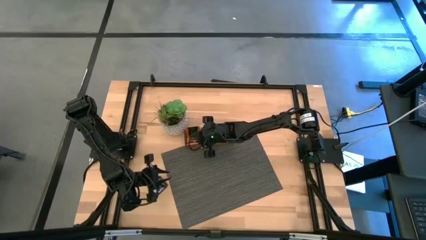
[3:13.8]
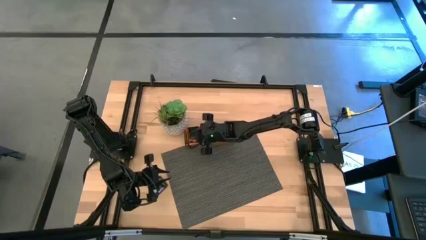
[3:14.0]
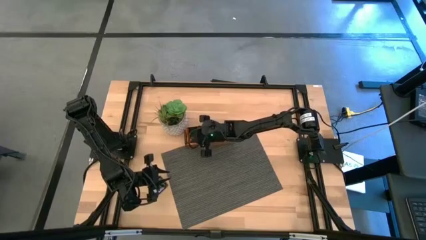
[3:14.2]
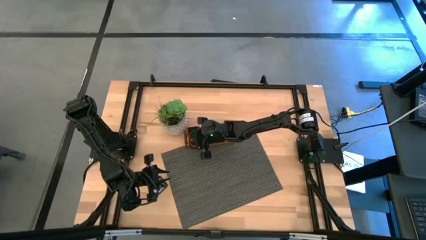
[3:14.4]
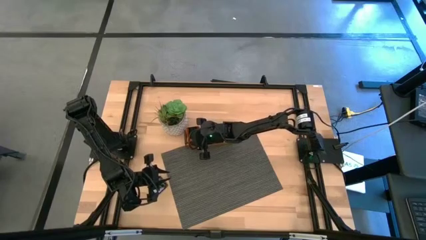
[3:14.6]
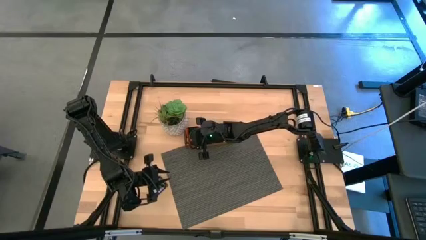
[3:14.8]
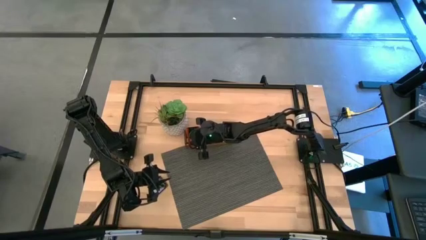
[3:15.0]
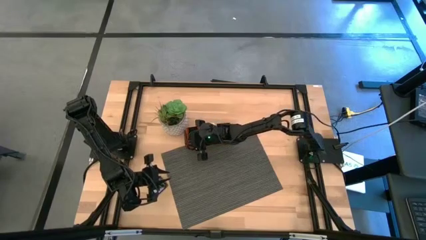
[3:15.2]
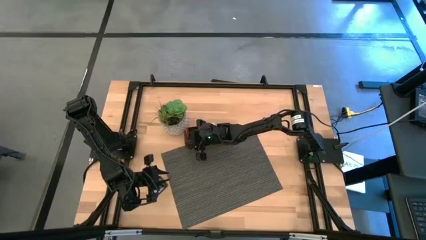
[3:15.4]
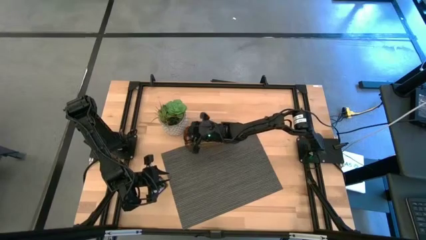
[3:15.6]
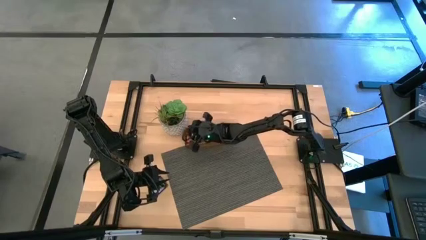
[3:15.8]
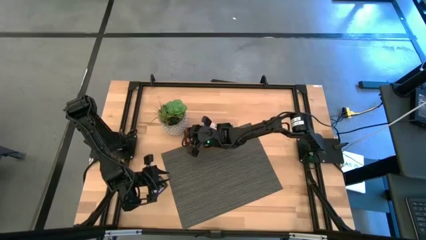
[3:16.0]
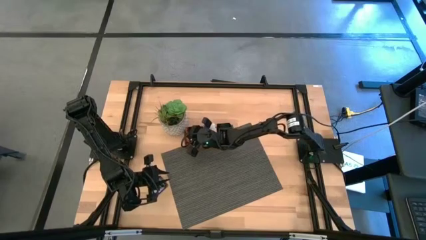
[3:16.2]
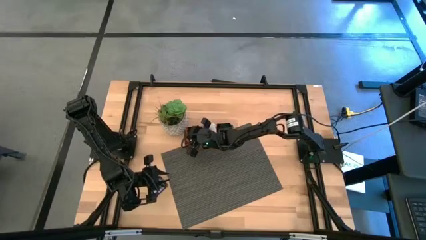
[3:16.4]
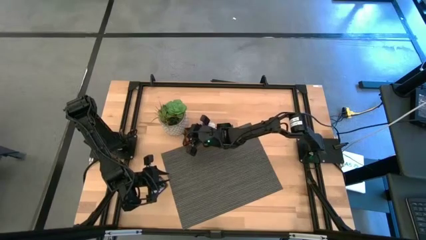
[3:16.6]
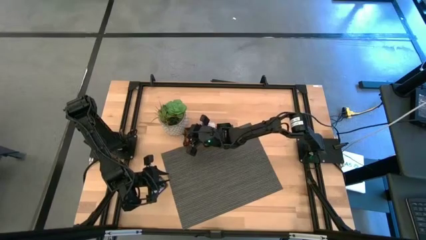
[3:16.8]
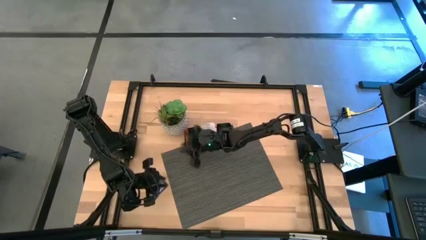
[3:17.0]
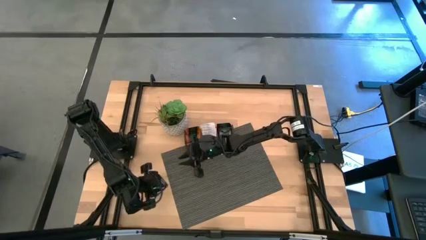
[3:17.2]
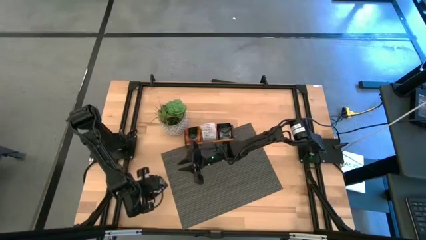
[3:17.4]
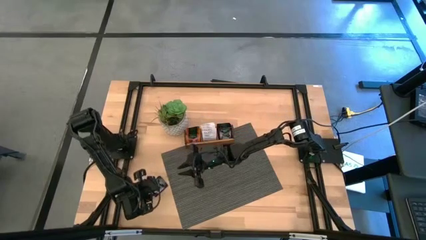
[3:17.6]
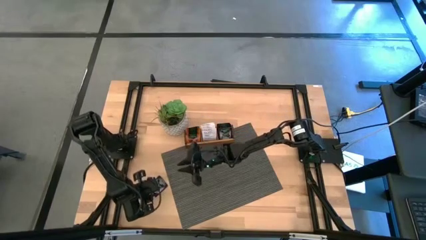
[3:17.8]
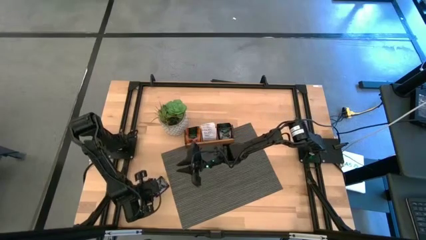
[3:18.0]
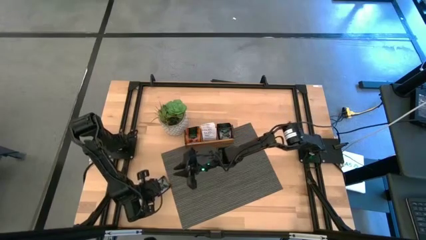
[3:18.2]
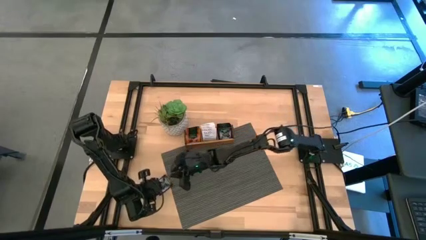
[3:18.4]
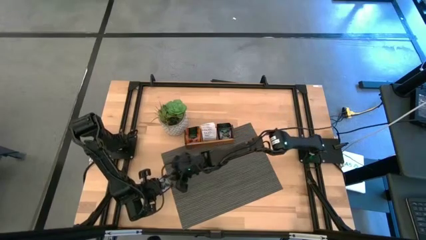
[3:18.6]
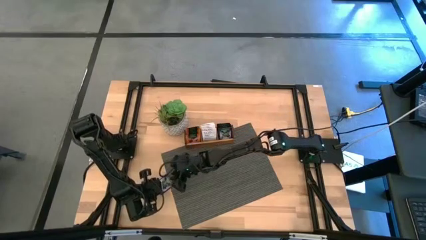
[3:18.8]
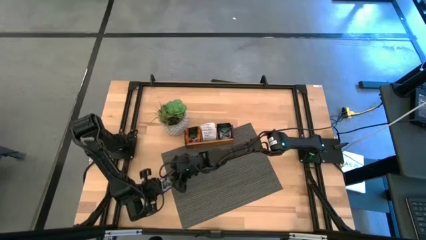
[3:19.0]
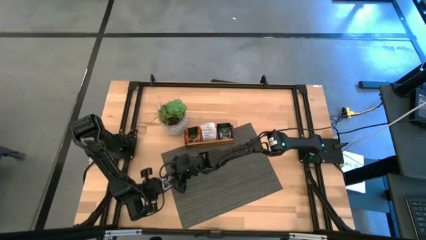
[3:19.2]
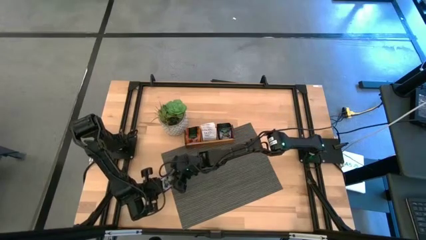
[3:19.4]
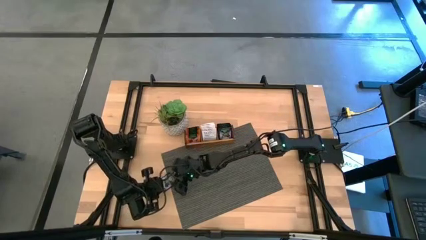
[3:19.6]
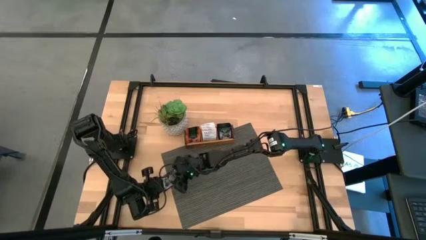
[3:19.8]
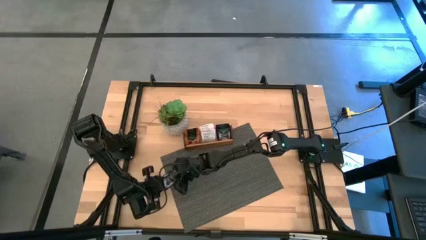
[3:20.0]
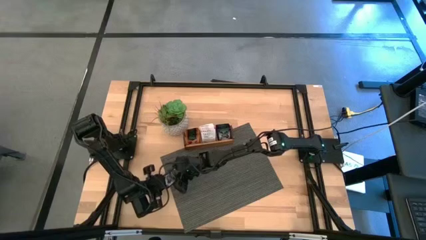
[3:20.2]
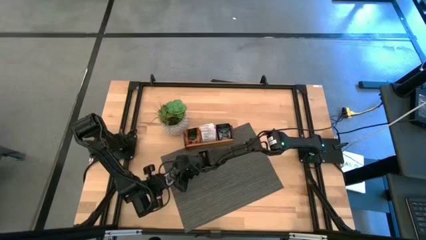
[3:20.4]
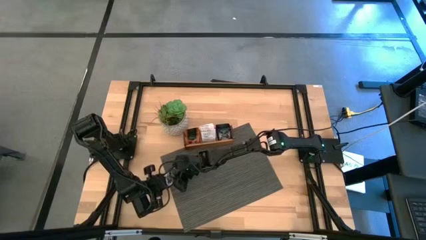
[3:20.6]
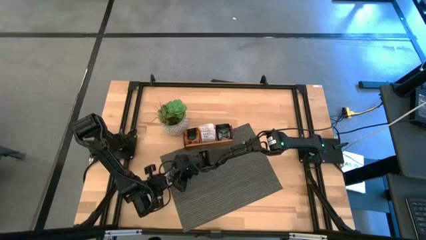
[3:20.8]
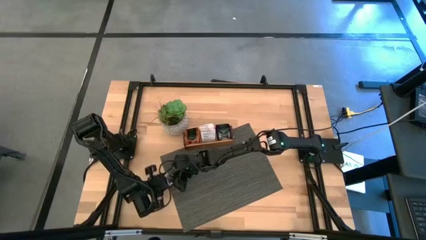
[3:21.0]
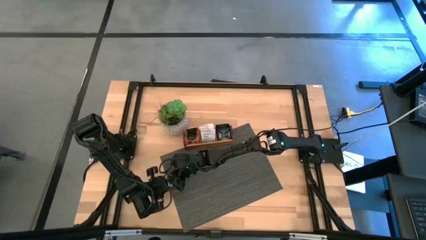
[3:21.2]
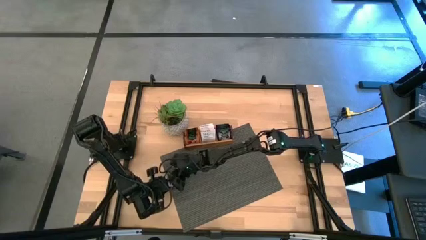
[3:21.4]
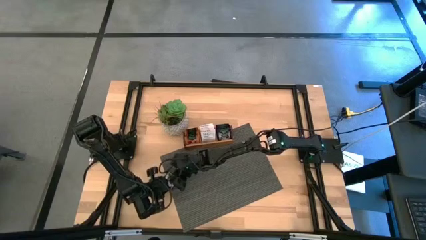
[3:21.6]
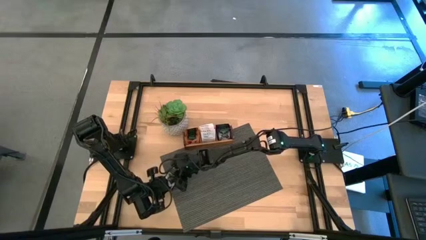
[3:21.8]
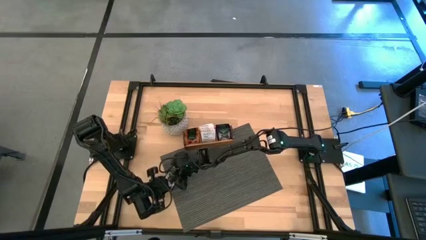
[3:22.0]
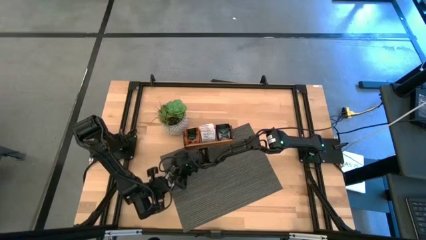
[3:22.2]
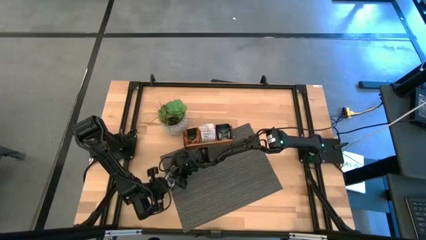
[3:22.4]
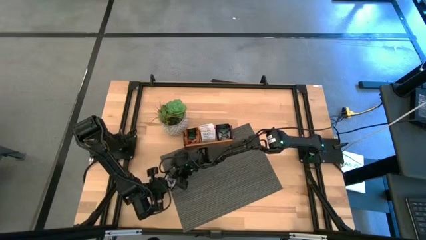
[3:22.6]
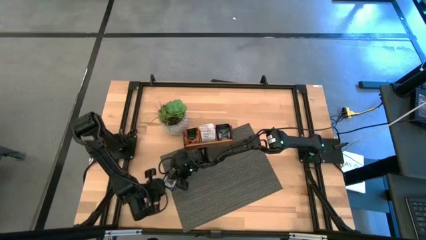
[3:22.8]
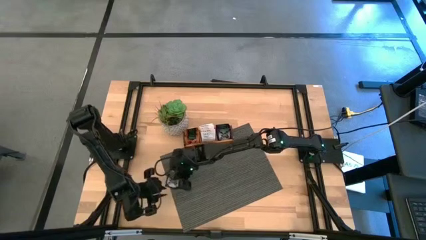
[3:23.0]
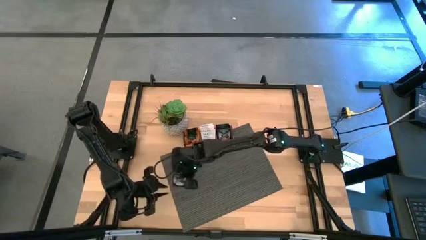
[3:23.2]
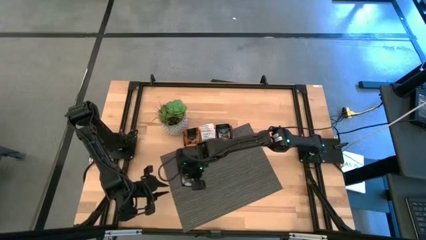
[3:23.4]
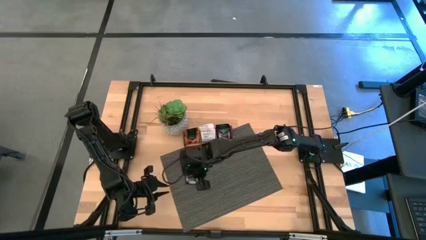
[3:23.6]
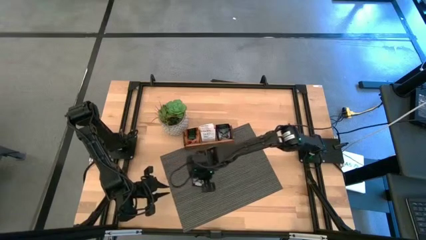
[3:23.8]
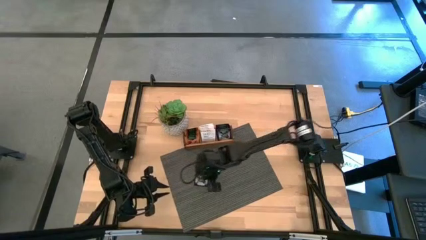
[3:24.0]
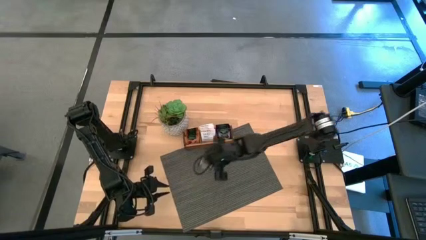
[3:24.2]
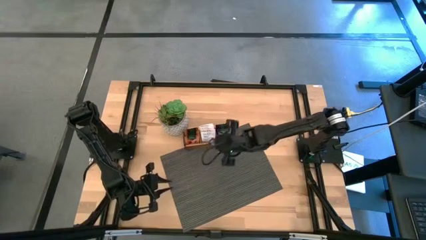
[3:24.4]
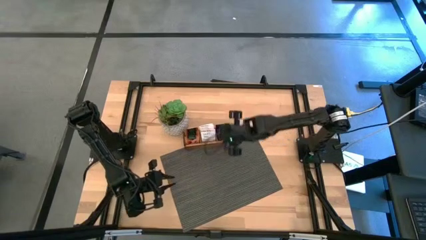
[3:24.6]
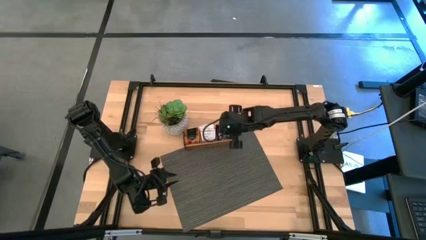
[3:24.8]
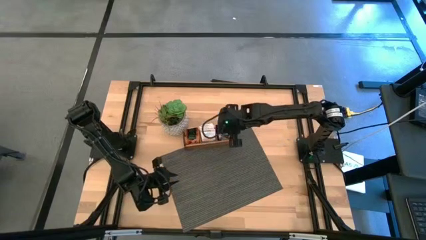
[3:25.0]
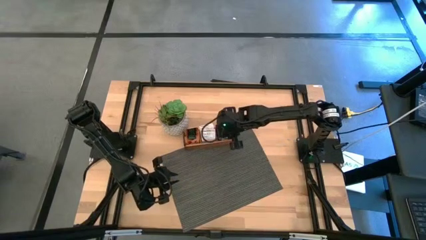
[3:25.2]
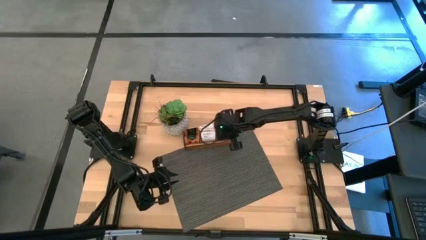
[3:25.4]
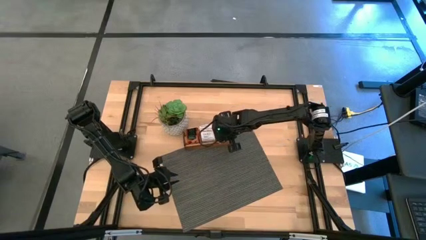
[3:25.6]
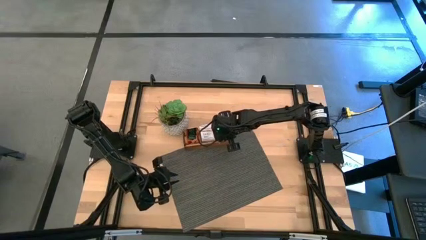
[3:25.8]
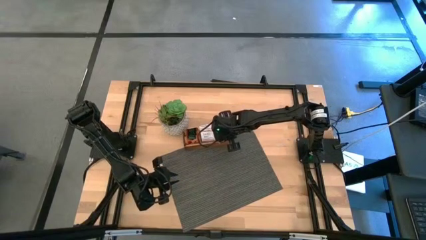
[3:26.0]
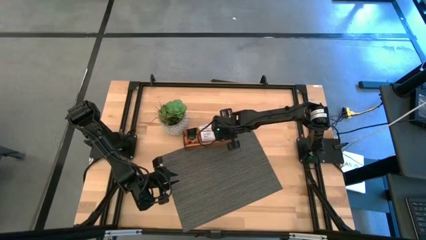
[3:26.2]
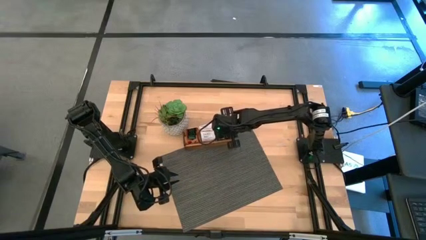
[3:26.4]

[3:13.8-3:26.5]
Task: Pick & Place Tea
Put the black tea bag into the right slot of the wooden organizer

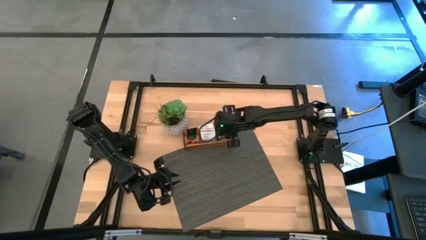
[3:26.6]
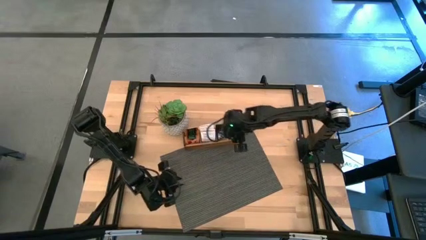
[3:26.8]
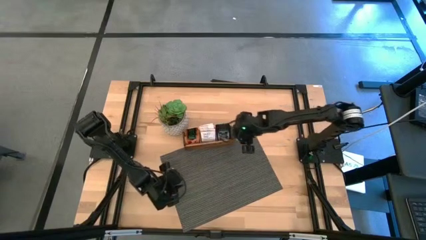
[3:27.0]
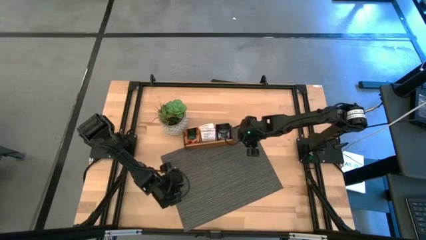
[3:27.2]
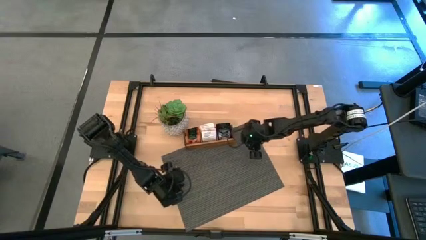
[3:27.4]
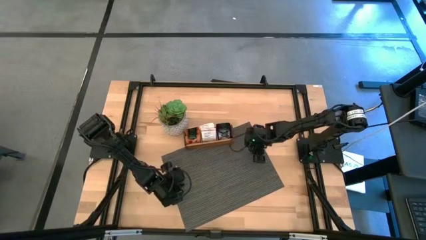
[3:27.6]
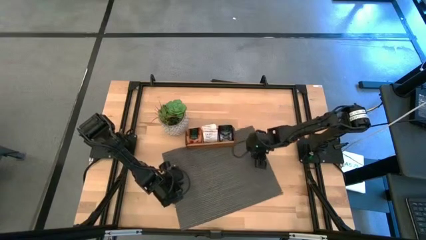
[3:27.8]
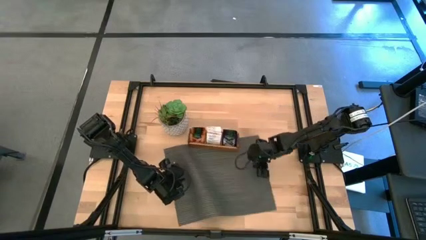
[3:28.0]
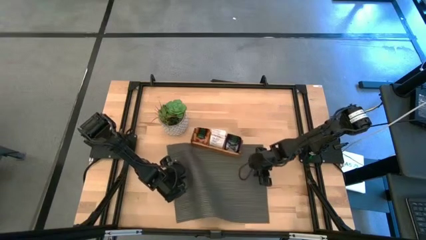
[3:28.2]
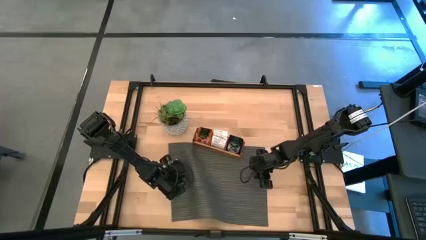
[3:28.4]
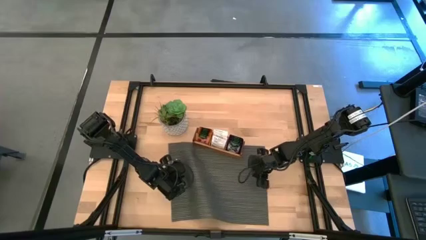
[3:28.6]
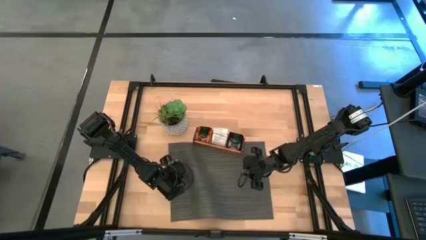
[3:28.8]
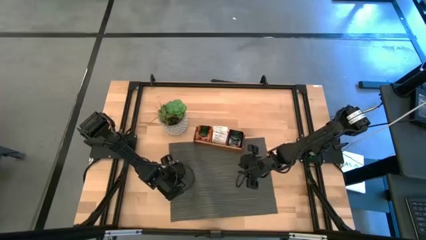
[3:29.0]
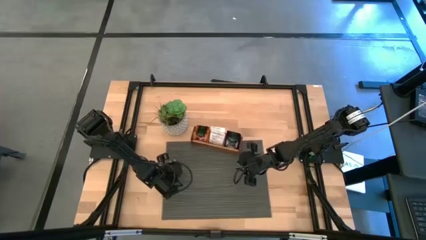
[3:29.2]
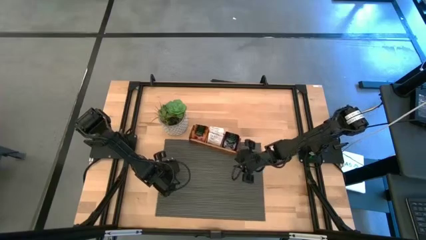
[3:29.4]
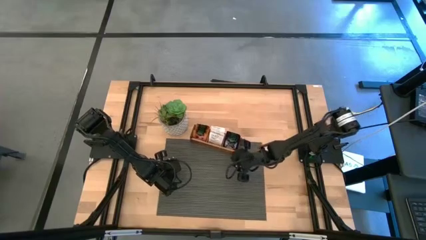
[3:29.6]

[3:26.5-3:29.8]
Adjust the mat on the table
